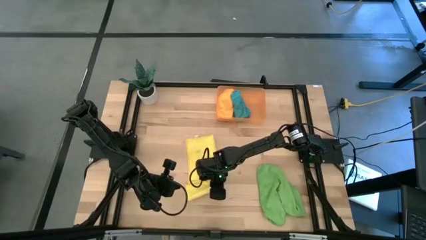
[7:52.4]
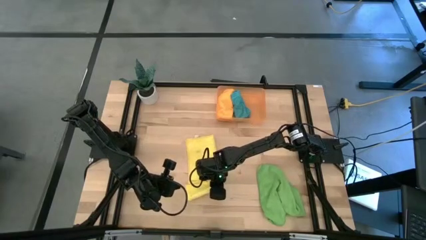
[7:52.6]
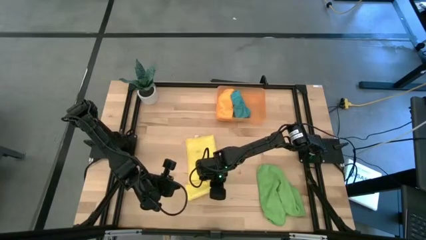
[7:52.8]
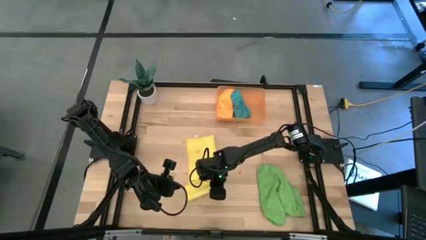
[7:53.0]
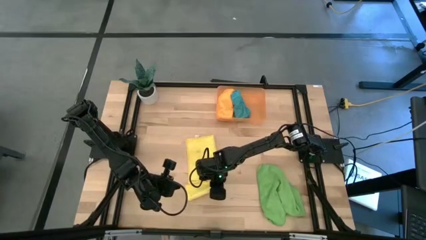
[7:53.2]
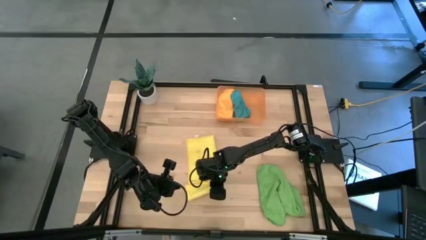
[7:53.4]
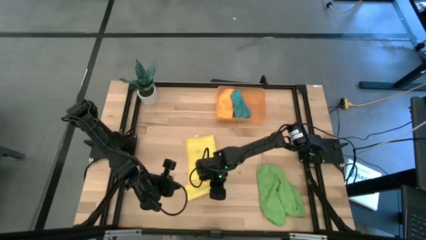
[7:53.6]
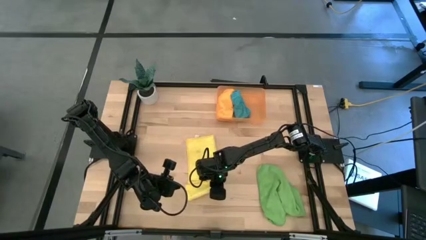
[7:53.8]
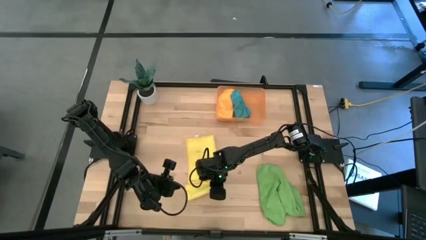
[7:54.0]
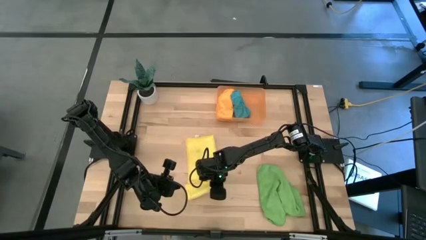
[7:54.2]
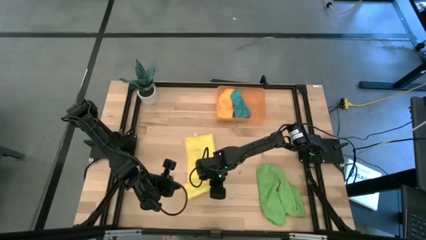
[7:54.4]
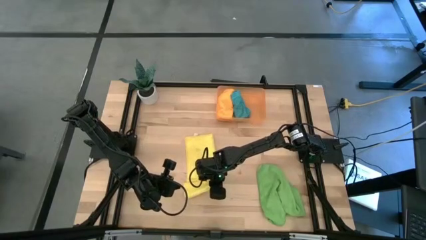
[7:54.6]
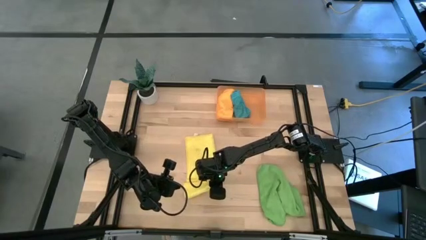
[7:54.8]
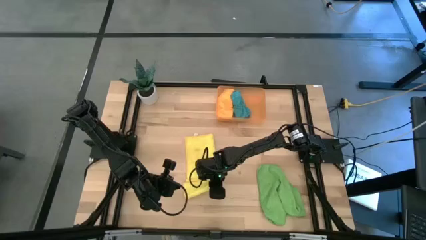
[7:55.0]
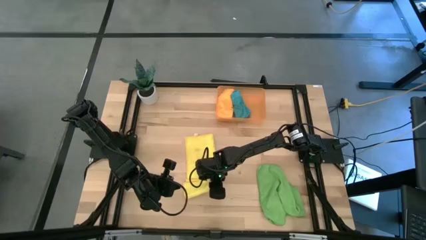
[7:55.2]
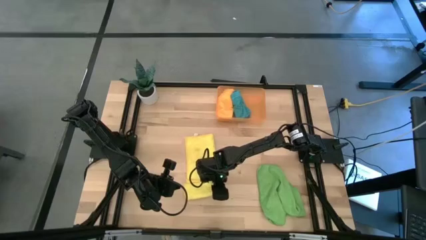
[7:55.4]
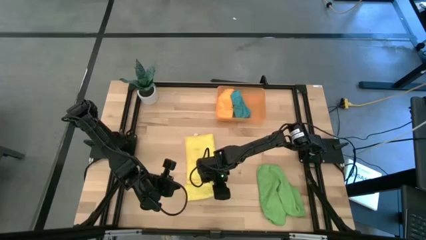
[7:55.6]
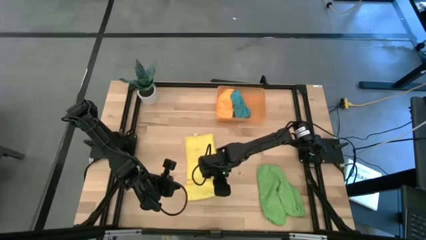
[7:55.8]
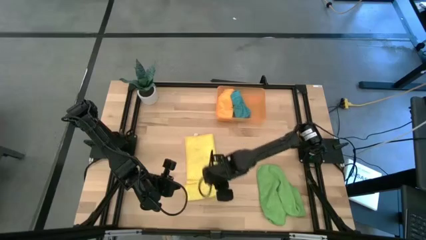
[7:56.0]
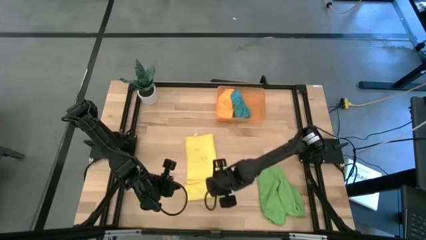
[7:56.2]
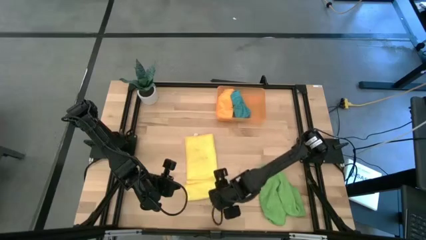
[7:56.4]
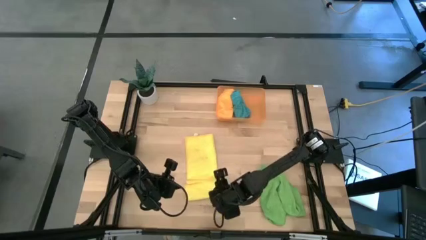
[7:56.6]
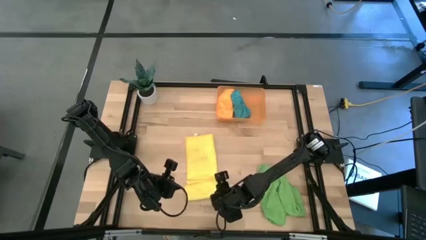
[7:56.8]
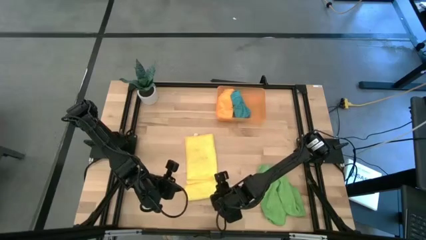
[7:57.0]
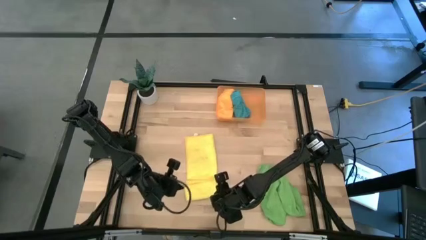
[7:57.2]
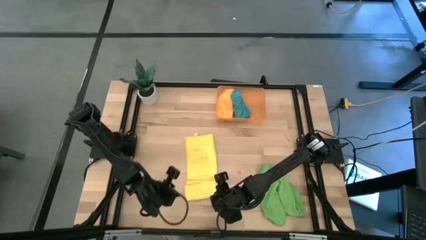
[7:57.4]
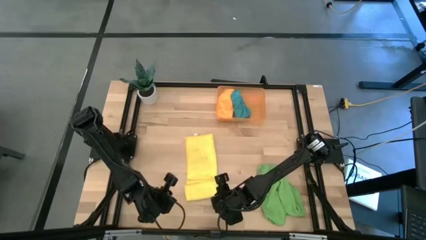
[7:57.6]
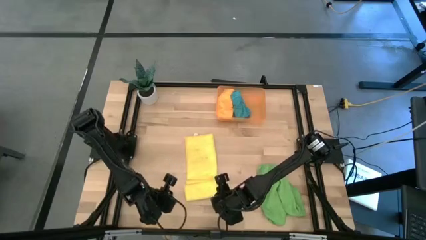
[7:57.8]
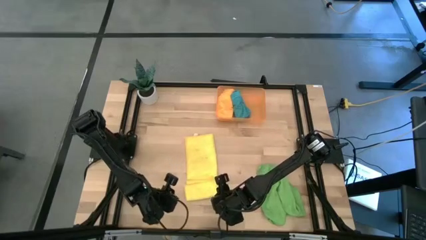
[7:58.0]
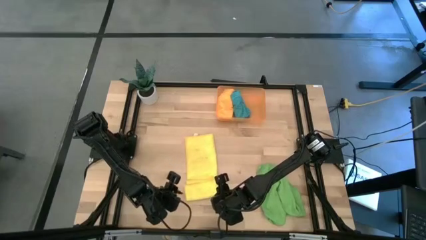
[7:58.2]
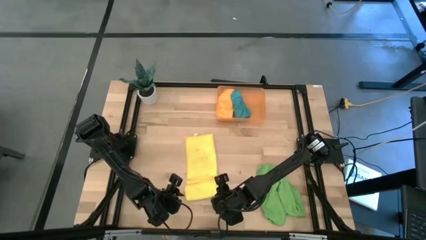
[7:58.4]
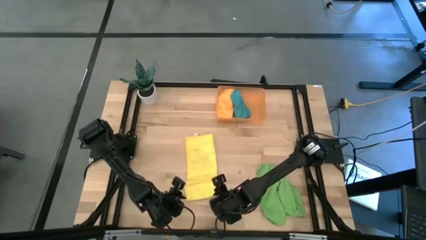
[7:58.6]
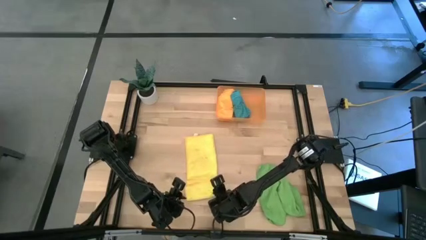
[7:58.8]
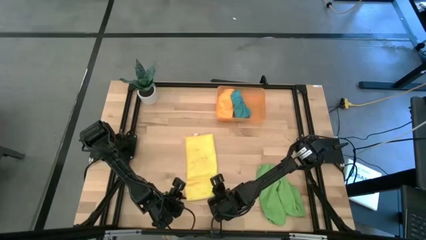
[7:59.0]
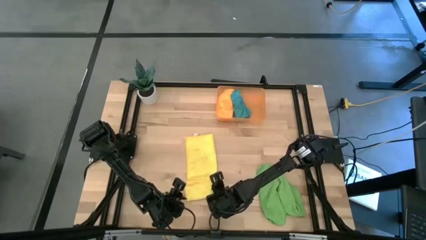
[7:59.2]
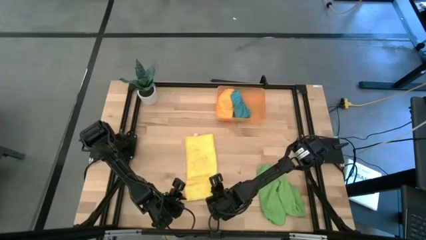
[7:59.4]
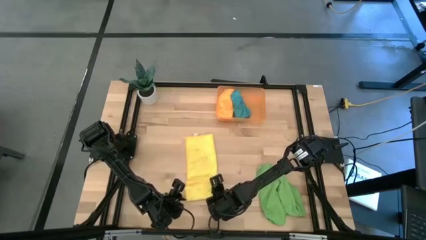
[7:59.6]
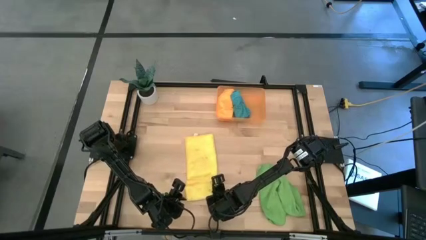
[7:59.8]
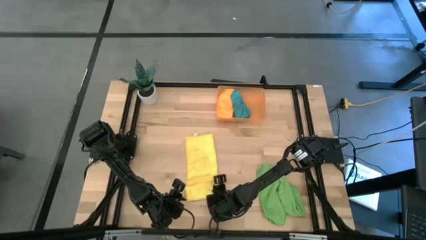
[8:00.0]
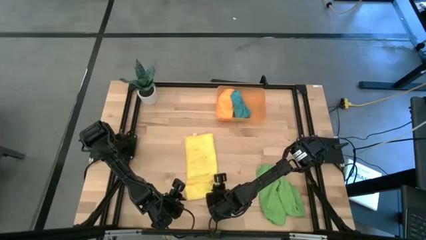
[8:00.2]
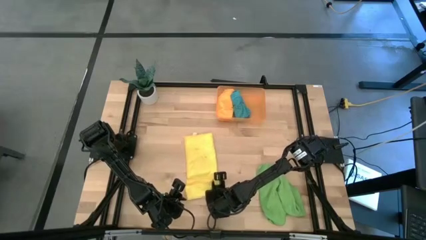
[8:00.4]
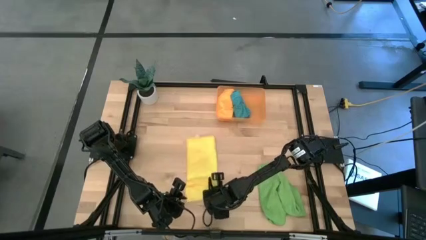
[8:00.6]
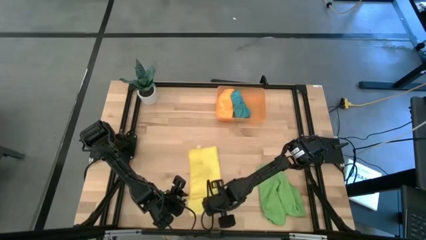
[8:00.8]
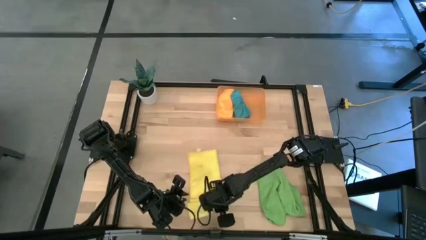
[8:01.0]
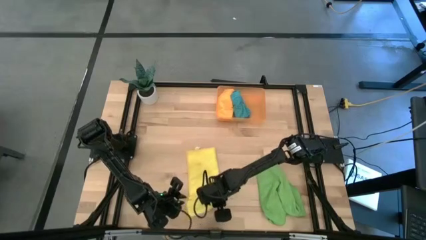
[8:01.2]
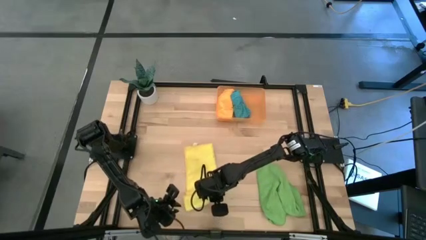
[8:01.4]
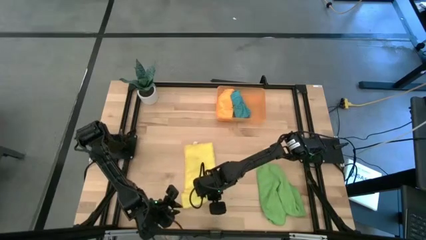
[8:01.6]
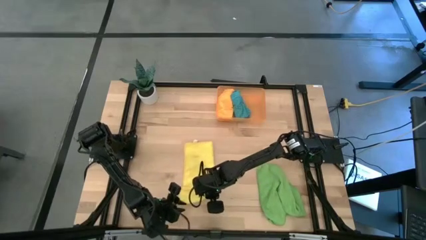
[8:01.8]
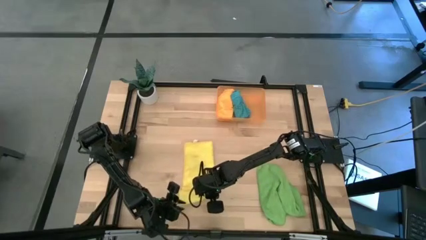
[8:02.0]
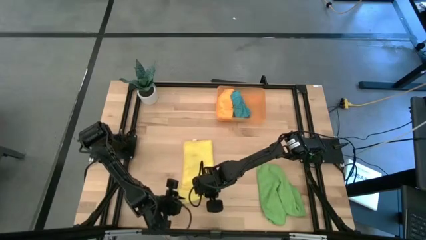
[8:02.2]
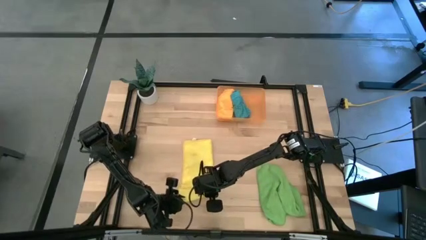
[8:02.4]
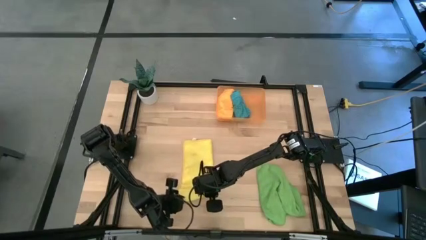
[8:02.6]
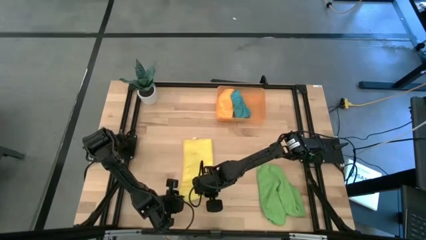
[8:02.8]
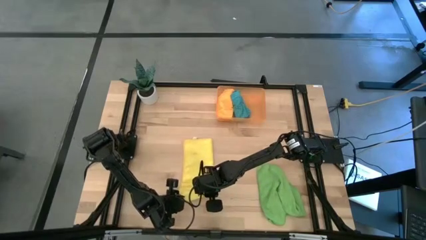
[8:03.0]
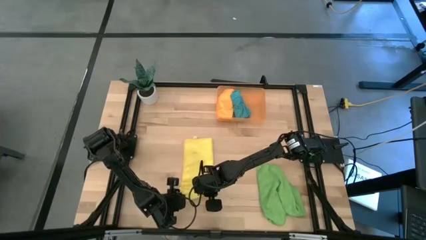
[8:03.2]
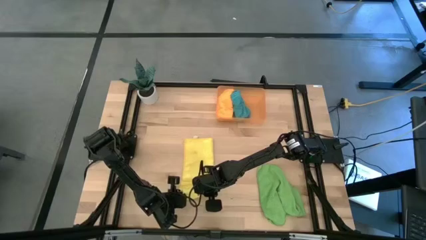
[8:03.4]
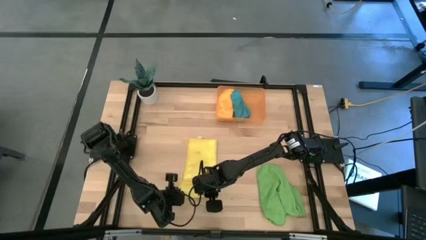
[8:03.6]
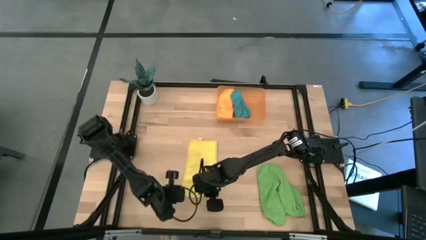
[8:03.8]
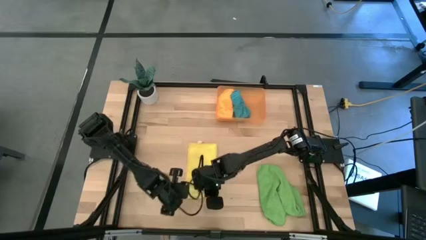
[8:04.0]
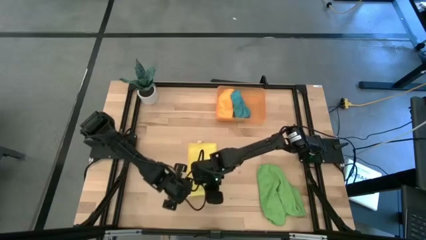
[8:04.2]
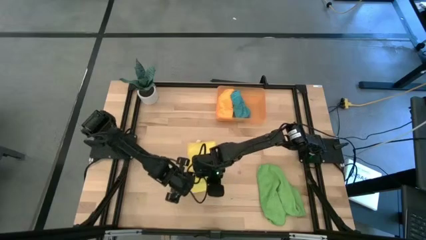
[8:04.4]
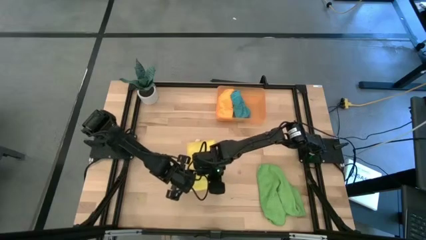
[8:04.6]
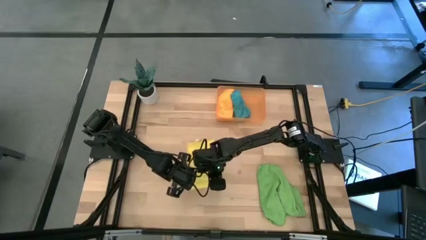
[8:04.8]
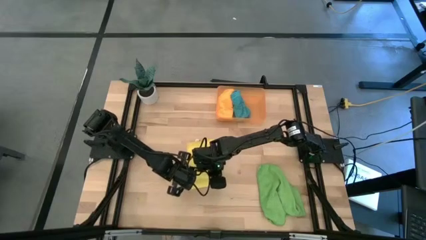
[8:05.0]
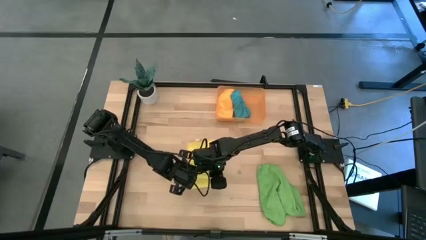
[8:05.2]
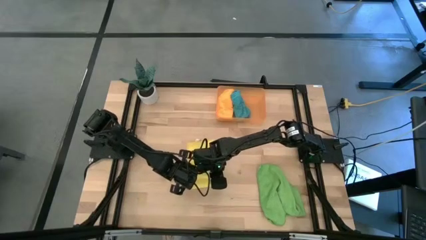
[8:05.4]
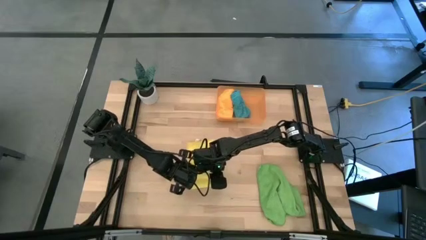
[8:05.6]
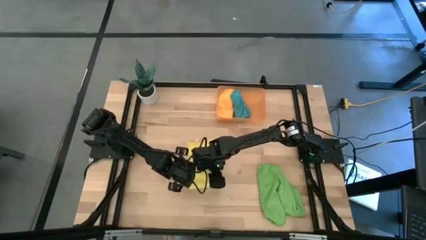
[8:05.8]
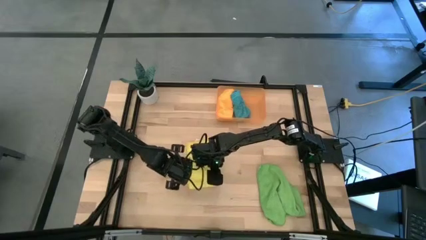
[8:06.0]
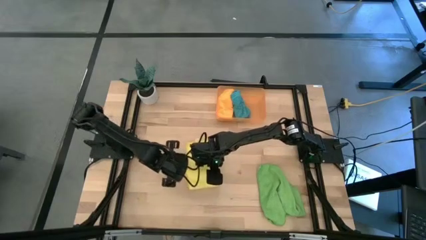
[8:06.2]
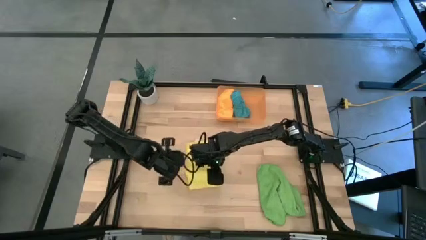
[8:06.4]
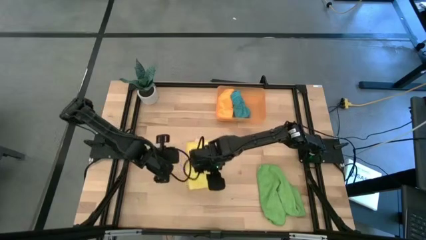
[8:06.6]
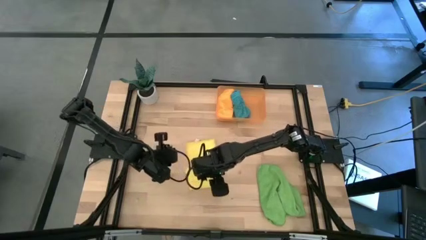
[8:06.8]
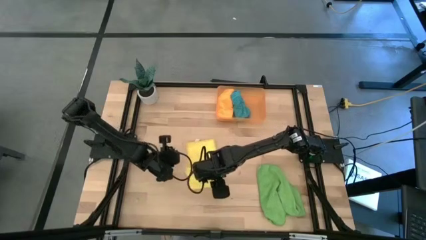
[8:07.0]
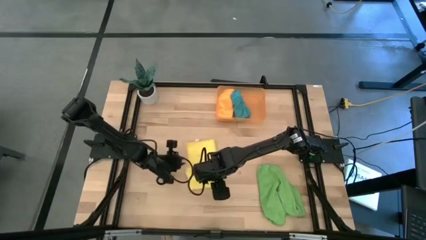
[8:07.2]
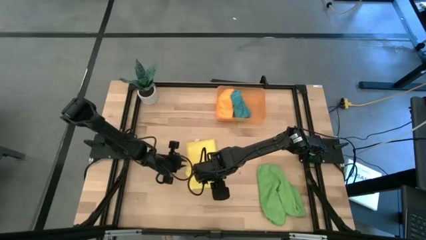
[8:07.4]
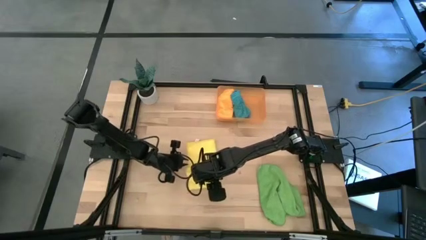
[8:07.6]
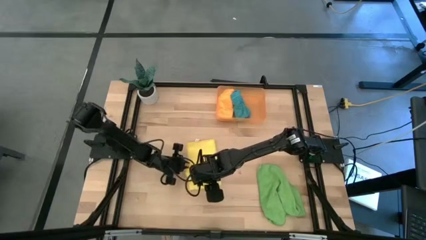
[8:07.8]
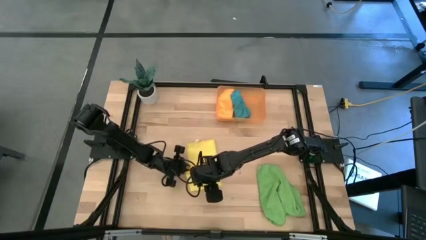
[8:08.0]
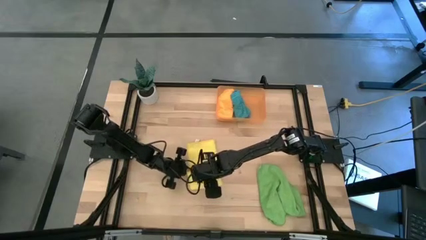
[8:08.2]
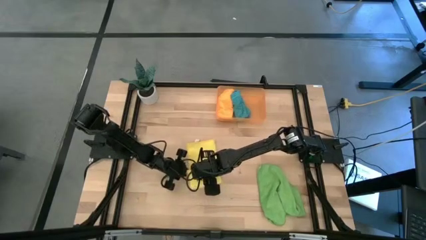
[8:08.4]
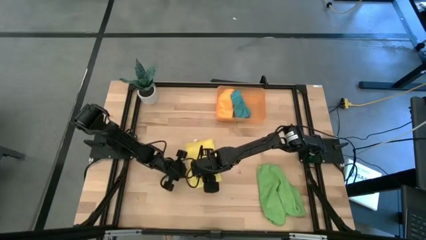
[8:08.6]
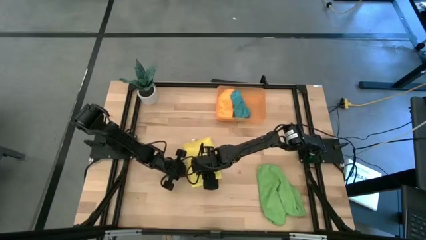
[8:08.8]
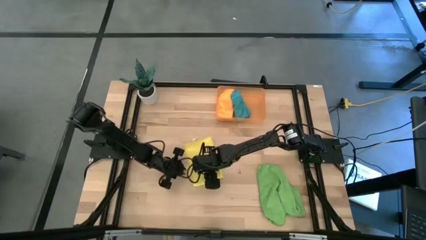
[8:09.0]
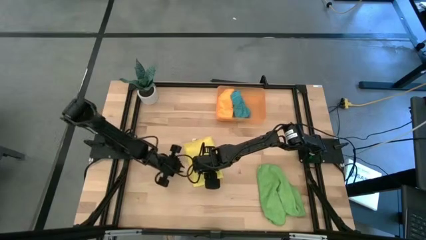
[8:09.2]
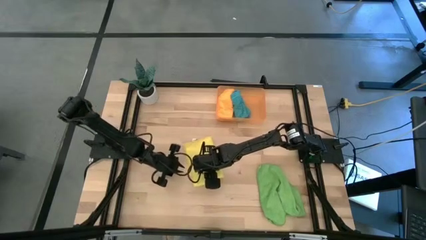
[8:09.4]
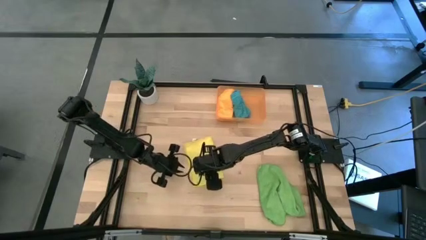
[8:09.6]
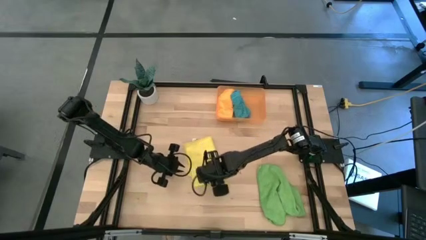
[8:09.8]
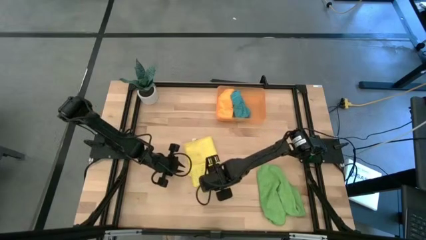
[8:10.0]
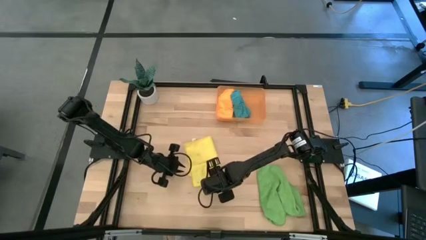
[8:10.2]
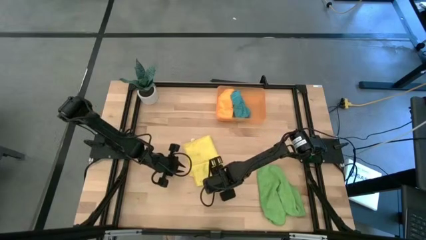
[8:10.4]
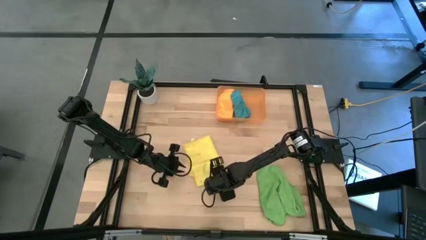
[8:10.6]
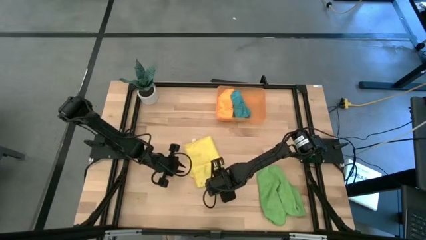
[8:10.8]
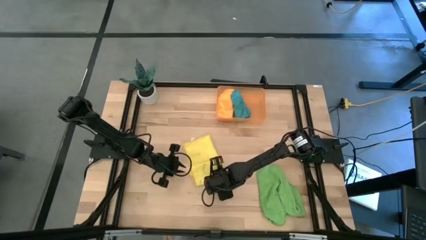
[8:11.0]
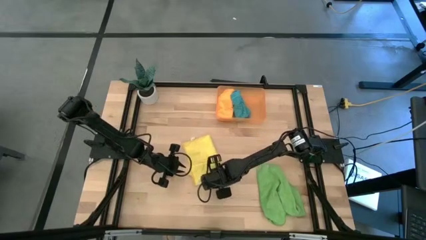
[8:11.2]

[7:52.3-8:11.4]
Task: Roll microfiber towels into tight, uniform cylinder then place into a basket
Roll the yellow microfiber towel
